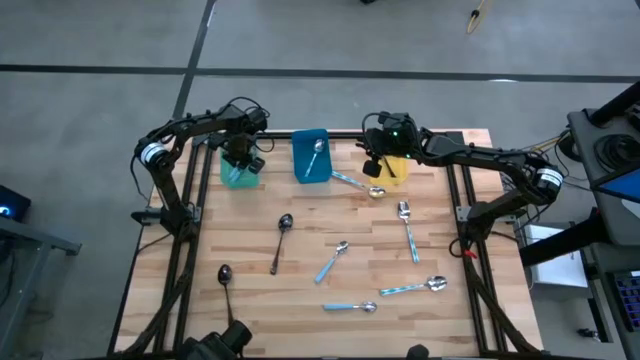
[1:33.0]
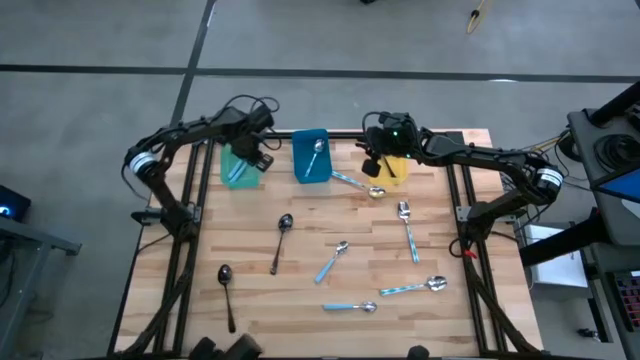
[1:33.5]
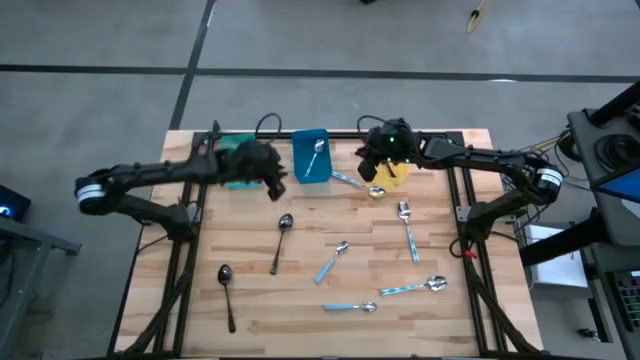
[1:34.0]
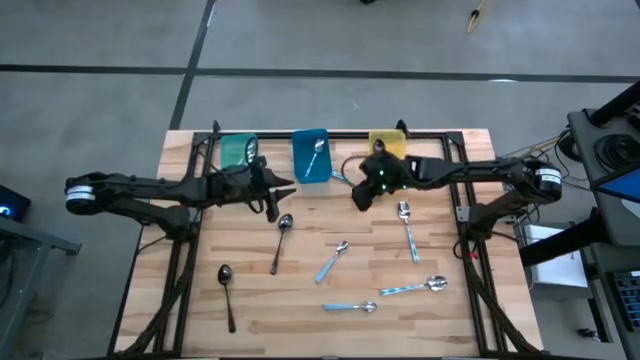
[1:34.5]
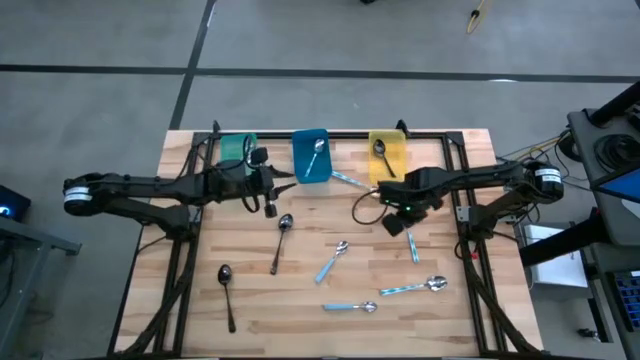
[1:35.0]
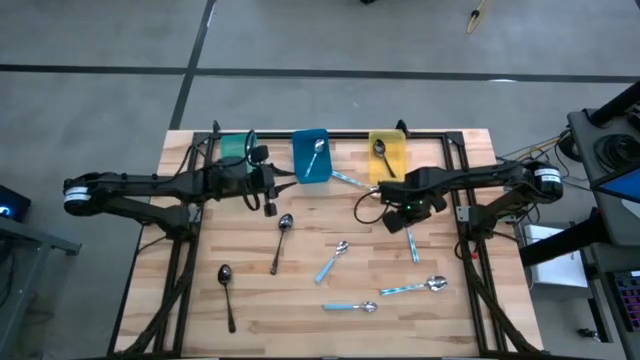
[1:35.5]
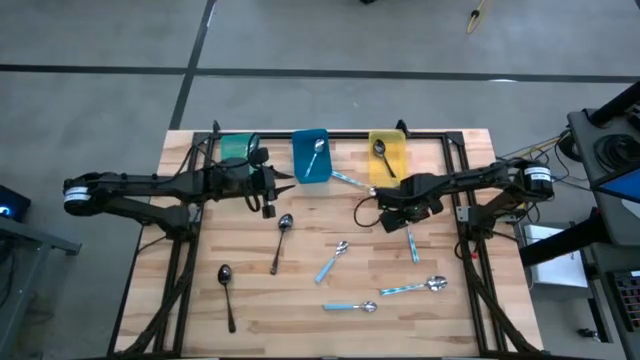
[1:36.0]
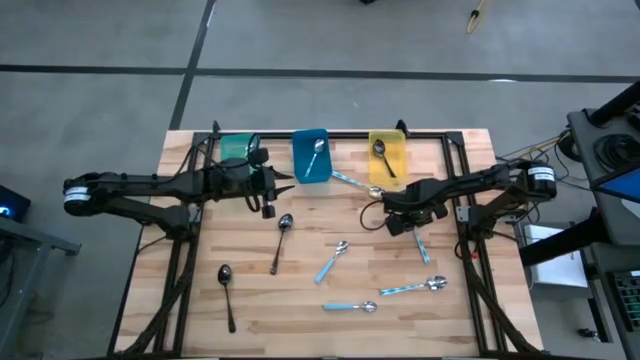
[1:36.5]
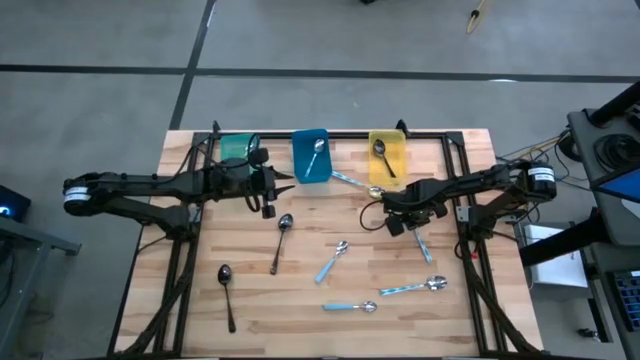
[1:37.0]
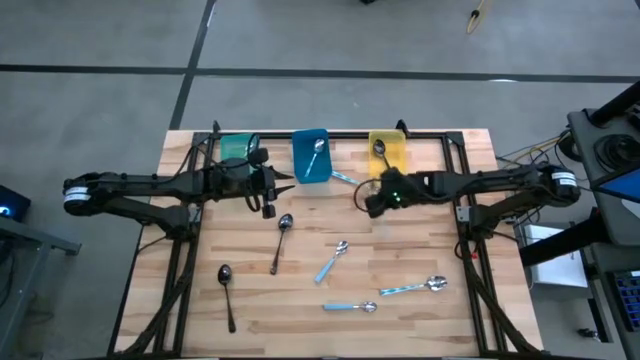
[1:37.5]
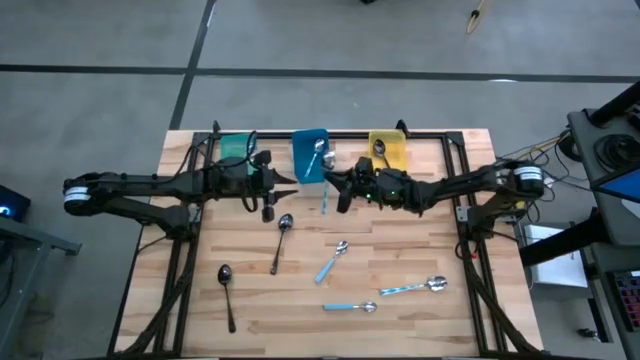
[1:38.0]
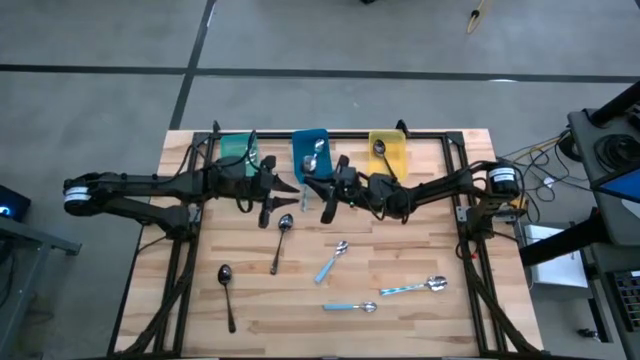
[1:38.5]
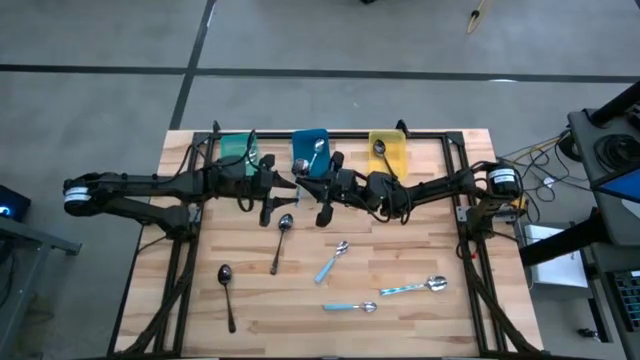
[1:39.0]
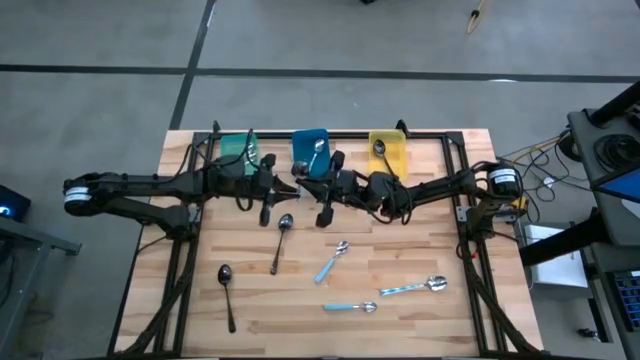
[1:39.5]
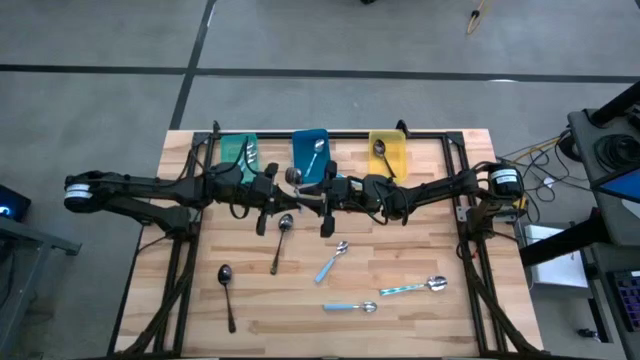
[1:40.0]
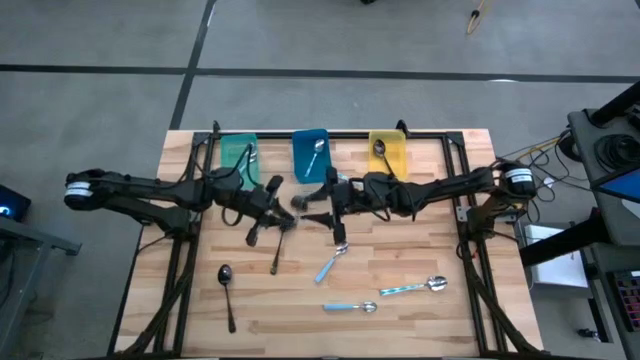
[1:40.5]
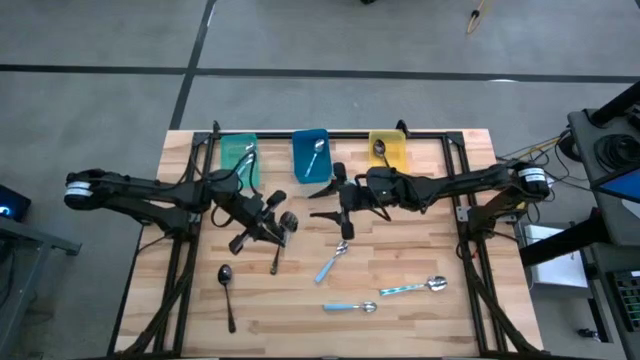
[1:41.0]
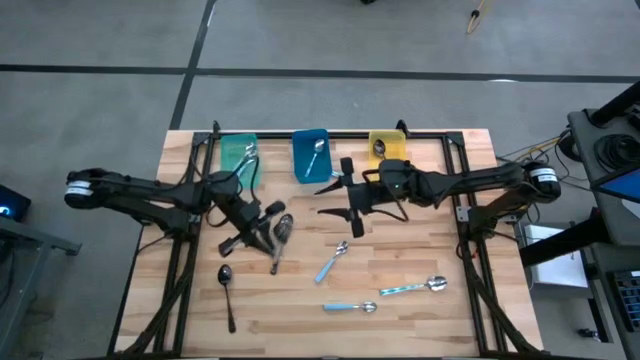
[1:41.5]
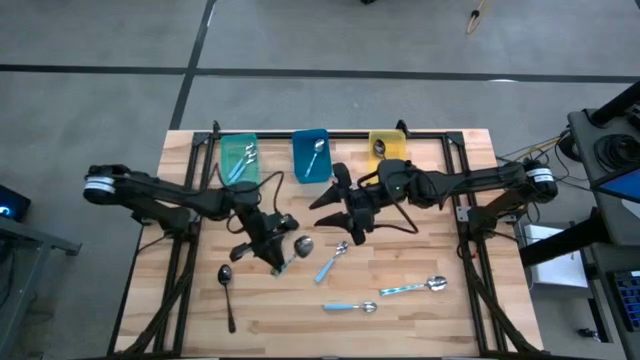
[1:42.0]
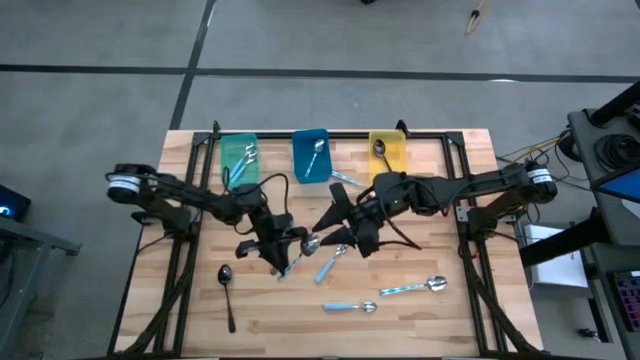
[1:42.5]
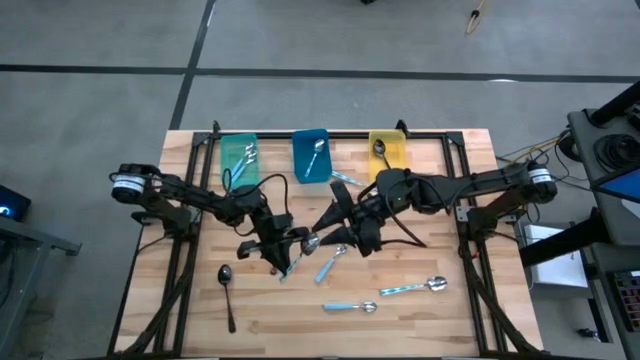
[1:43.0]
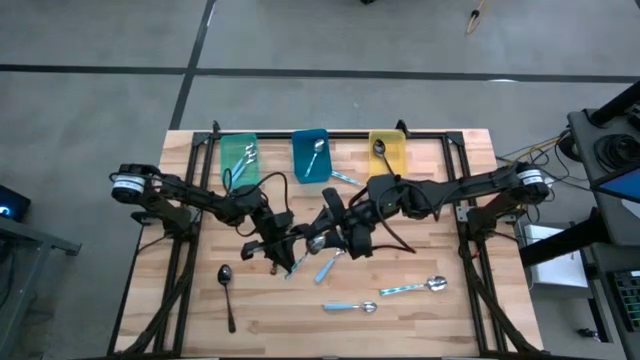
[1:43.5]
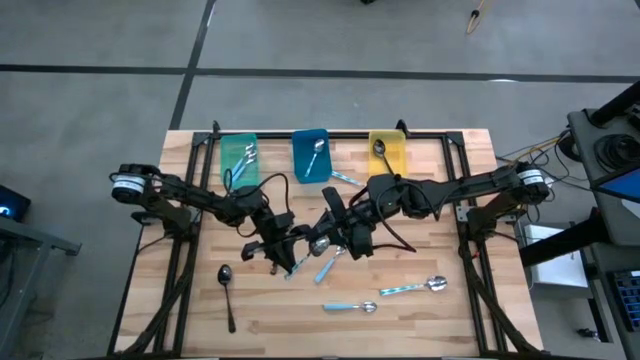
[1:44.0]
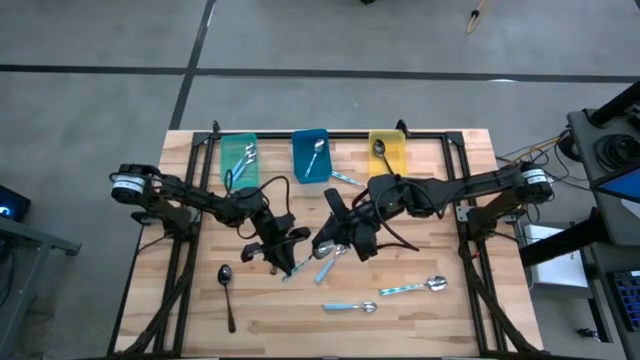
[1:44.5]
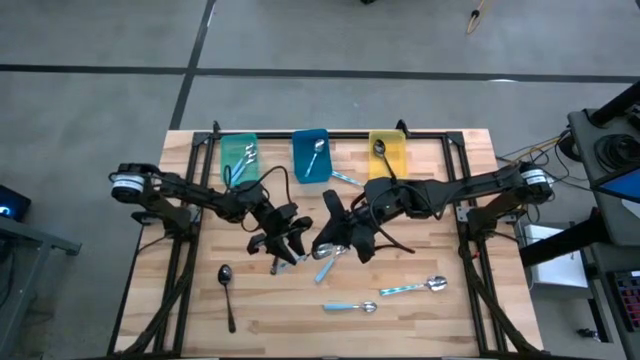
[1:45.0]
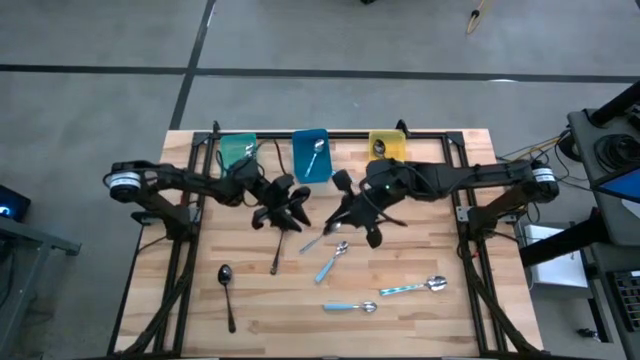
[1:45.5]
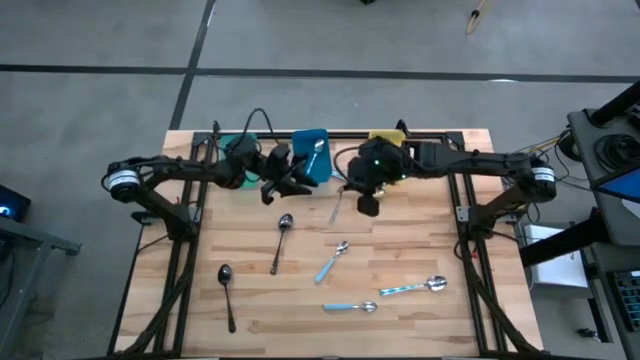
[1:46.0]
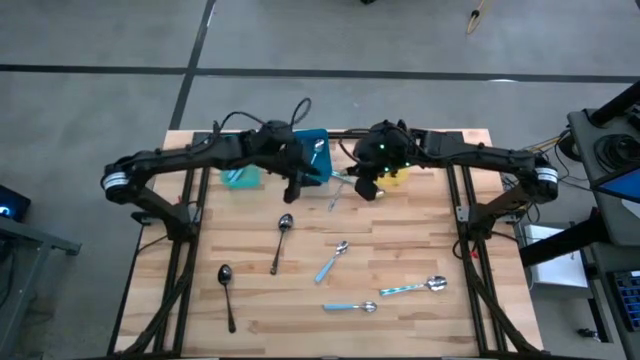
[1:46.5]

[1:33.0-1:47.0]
Task: Sort silverware by color (type)
Put the white-blue spoon into the blue bin

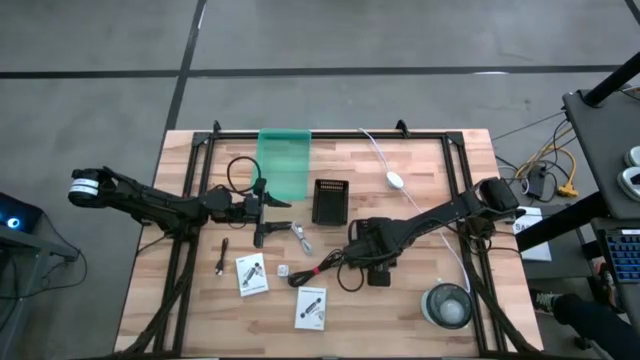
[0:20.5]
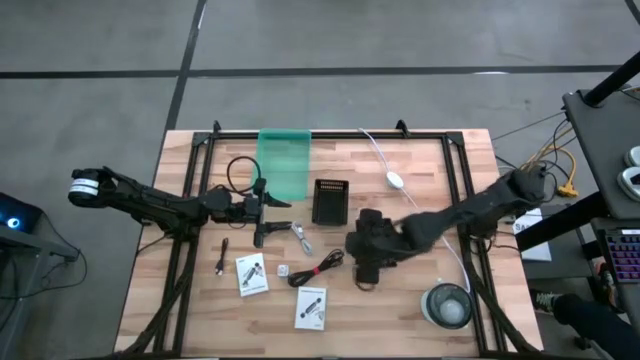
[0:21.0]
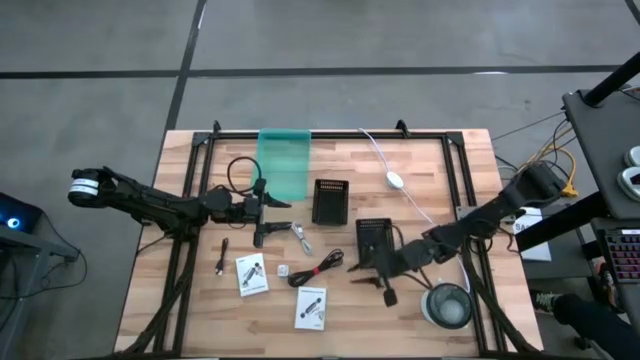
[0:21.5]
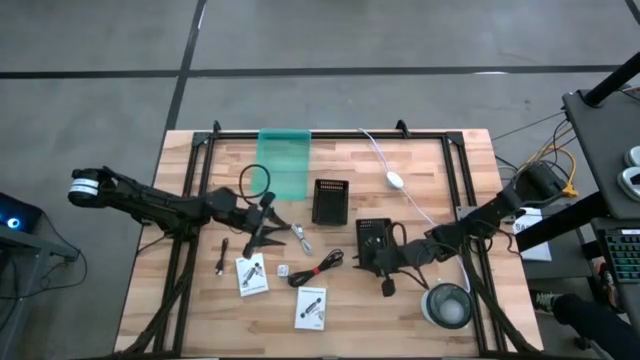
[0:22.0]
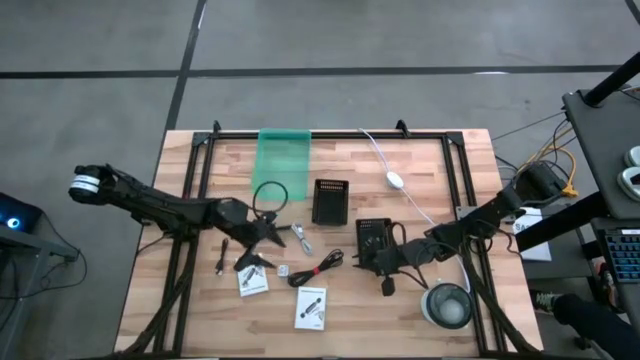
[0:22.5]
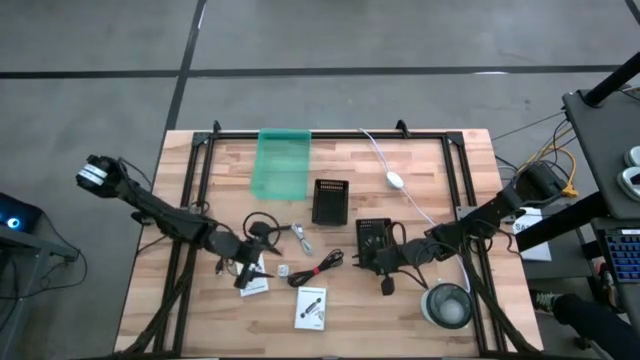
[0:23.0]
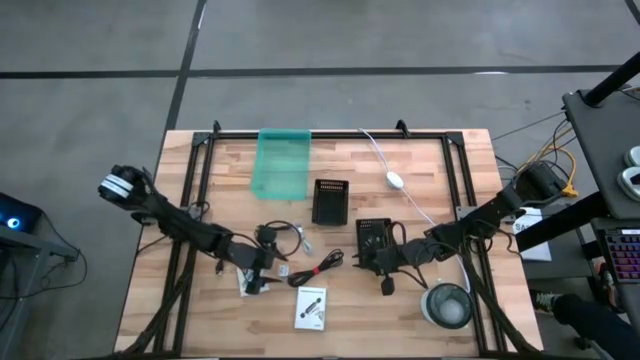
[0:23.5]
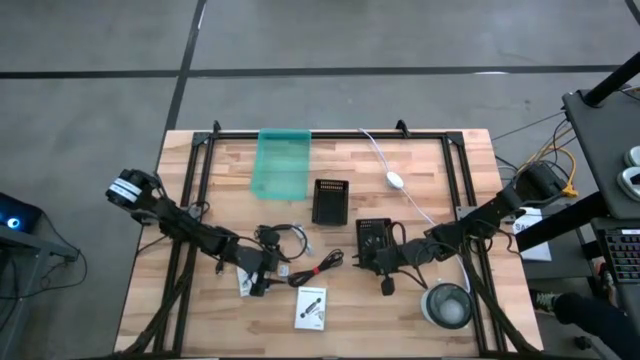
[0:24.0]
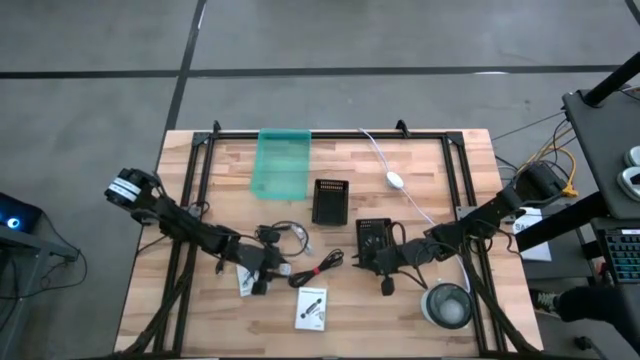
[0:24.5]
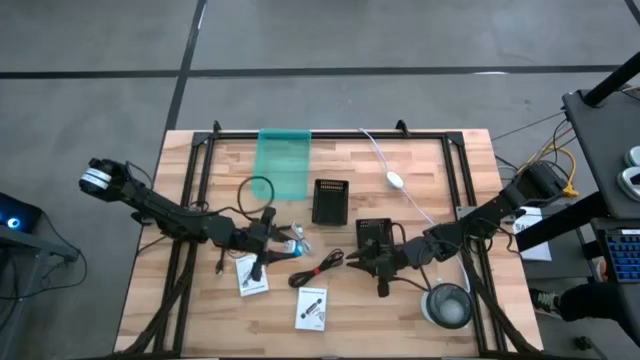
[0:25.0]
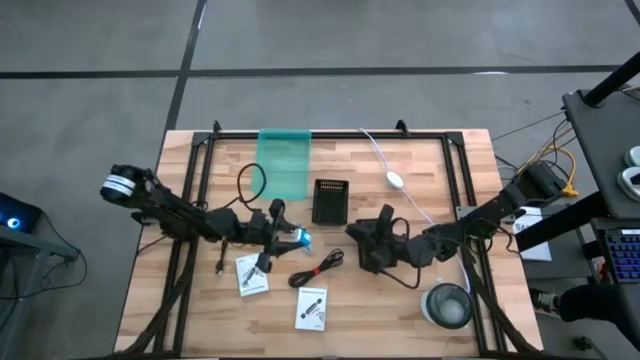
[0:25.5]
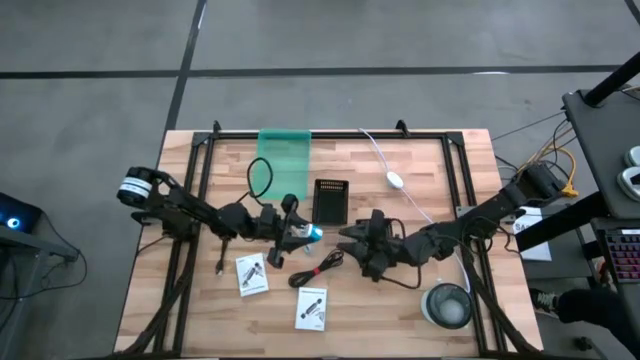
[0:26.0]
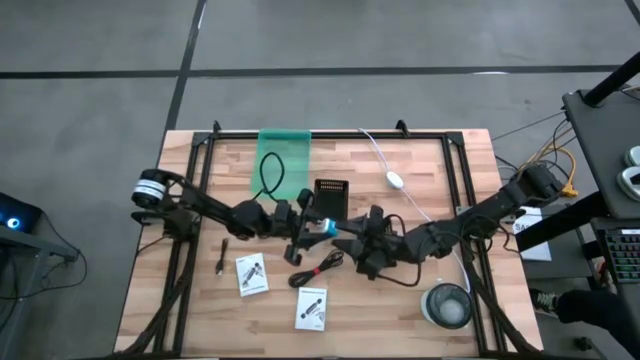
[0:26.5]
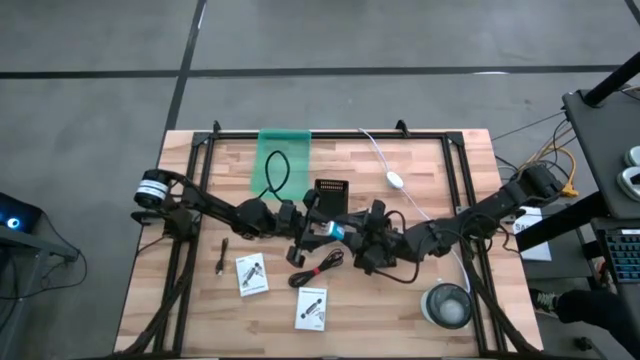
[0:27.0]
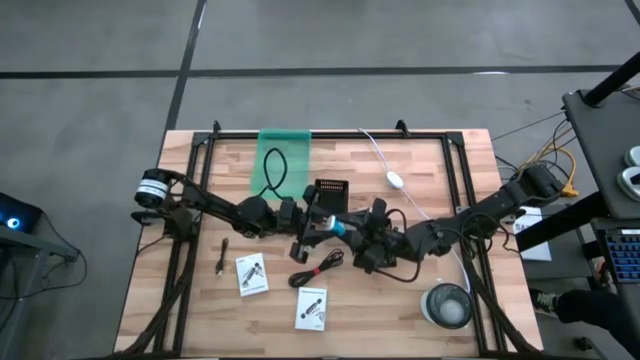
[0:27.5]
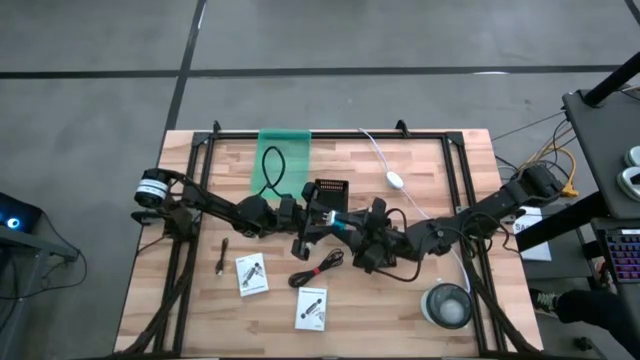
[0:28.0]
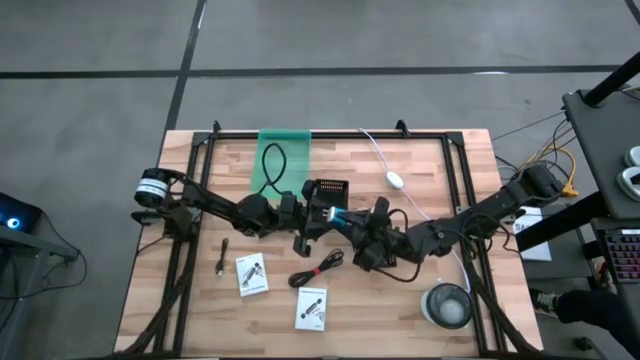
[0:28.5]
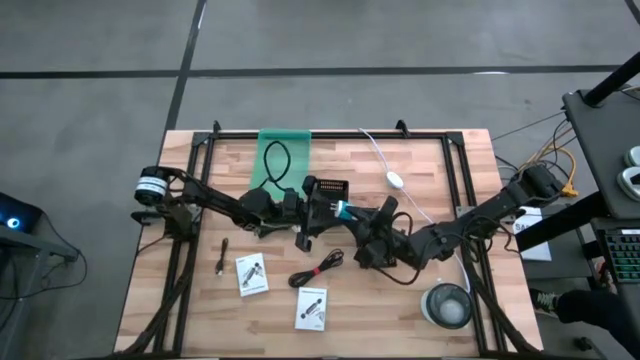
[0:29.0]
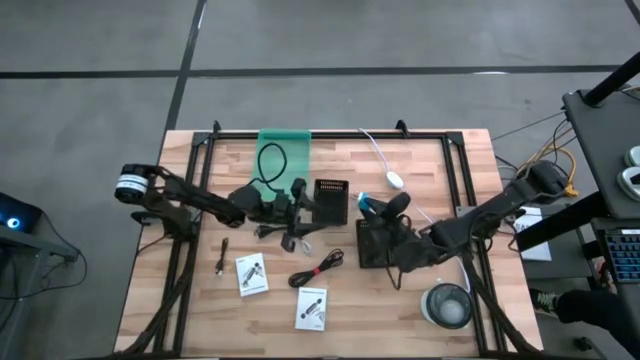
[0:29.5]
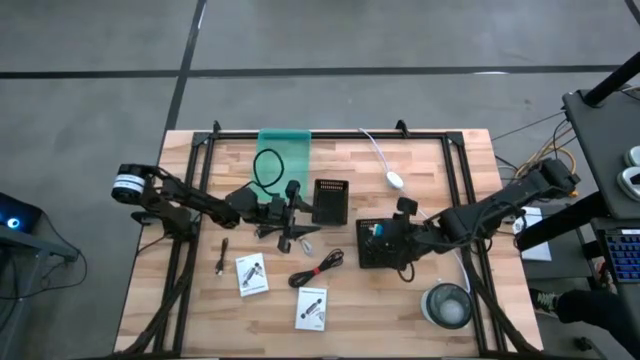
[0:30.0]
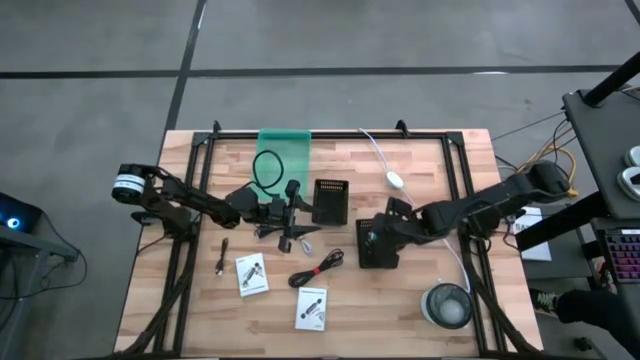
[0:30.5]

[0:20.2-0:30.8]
Task: Pick and place items into bin
Put the blue charger adapter into the bottom black basket
